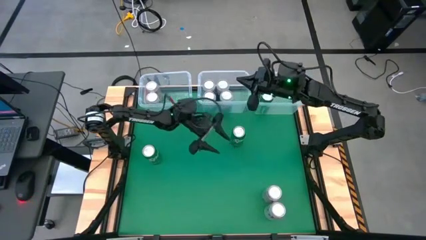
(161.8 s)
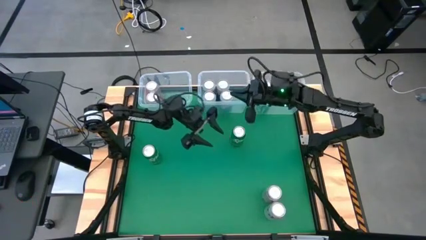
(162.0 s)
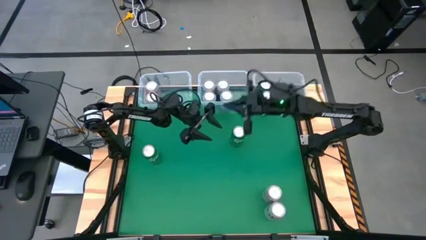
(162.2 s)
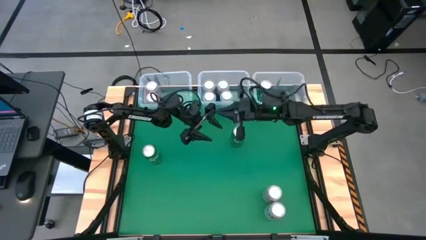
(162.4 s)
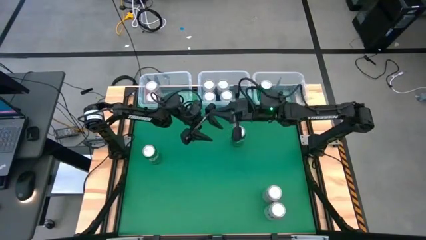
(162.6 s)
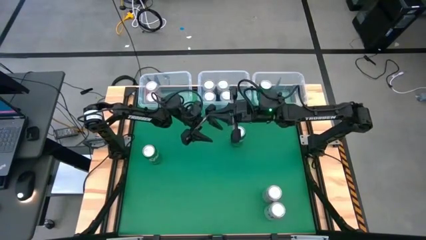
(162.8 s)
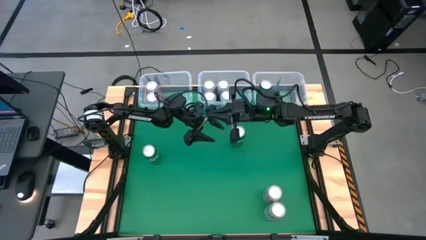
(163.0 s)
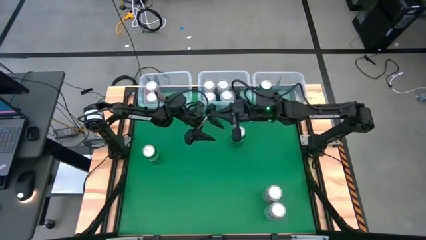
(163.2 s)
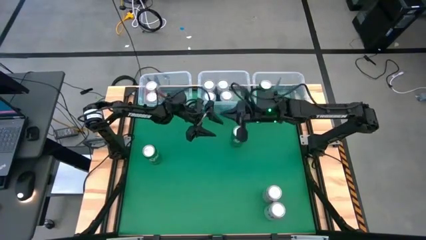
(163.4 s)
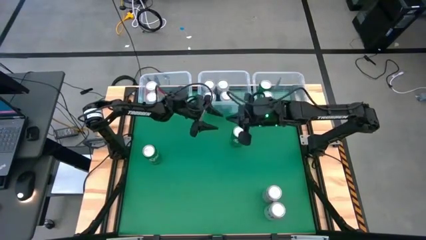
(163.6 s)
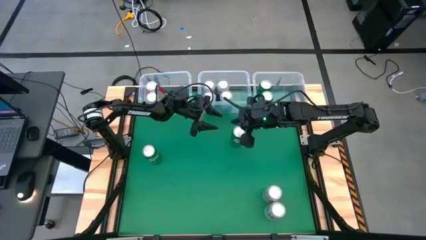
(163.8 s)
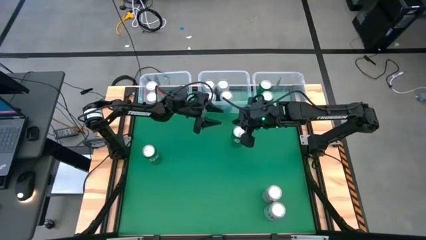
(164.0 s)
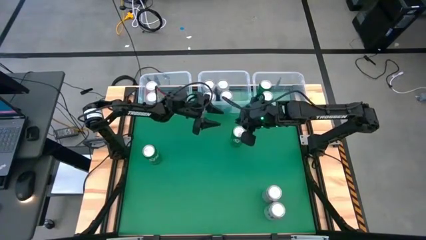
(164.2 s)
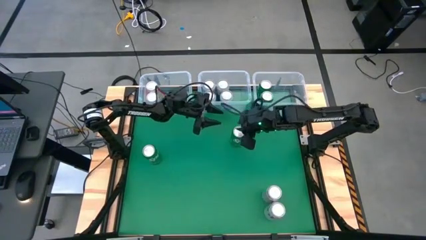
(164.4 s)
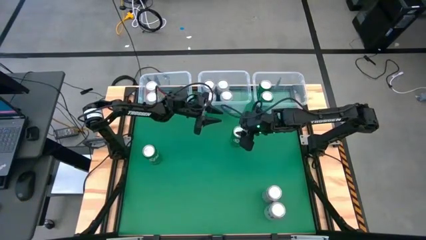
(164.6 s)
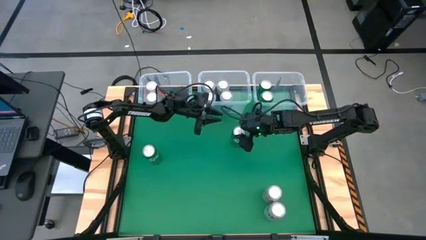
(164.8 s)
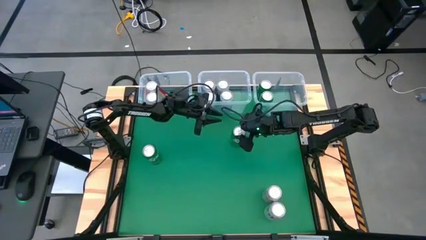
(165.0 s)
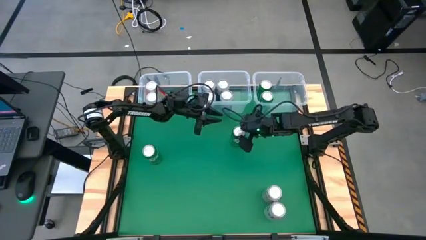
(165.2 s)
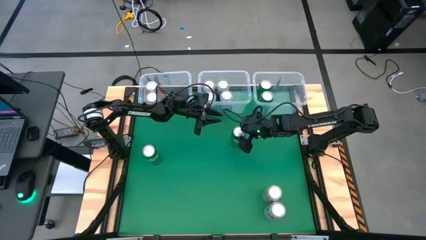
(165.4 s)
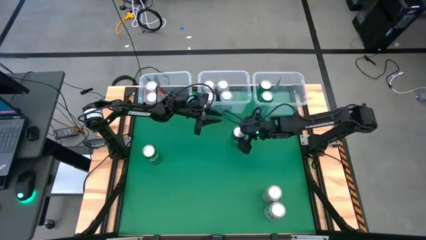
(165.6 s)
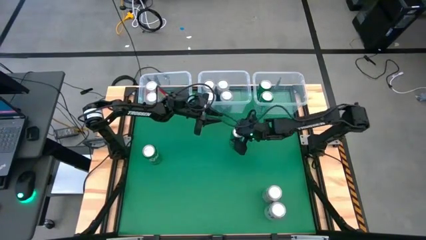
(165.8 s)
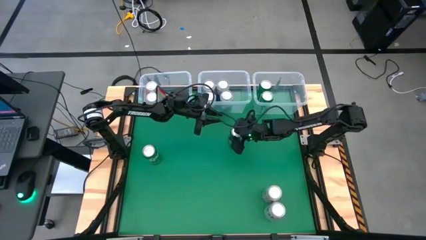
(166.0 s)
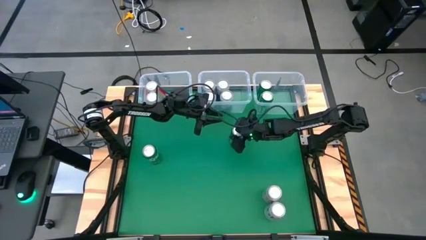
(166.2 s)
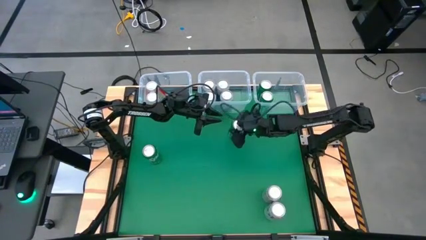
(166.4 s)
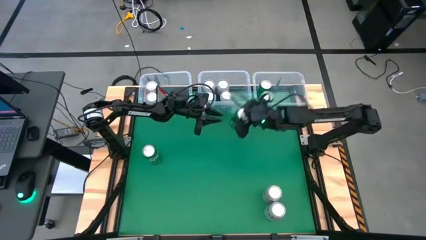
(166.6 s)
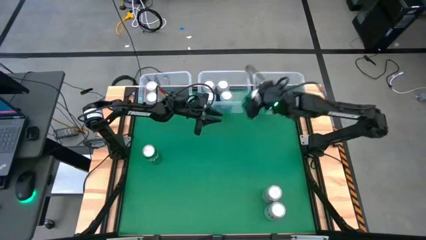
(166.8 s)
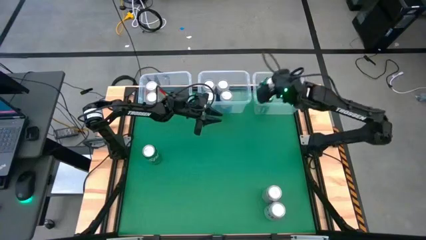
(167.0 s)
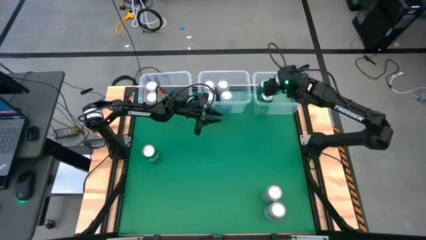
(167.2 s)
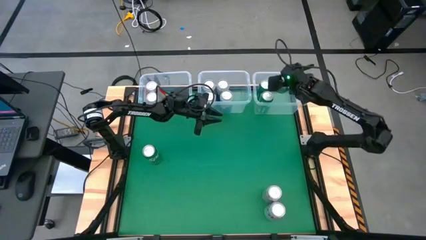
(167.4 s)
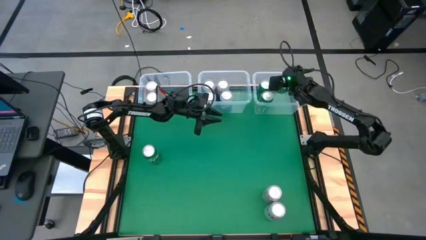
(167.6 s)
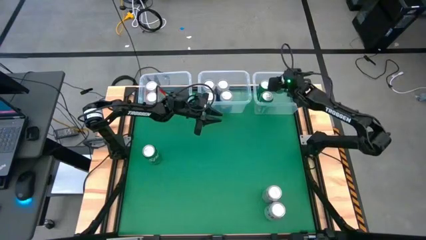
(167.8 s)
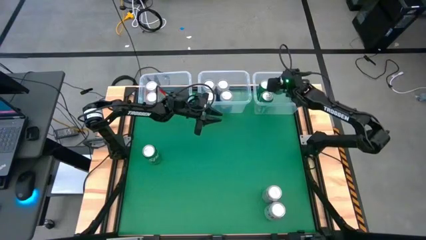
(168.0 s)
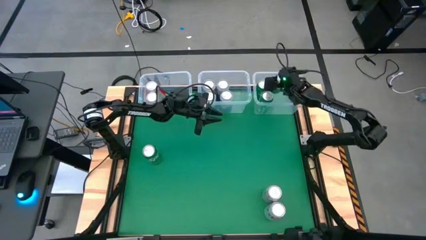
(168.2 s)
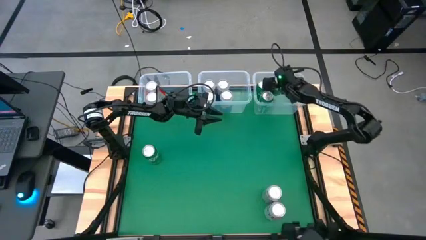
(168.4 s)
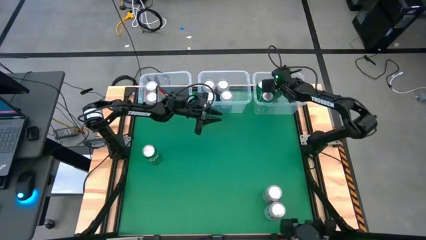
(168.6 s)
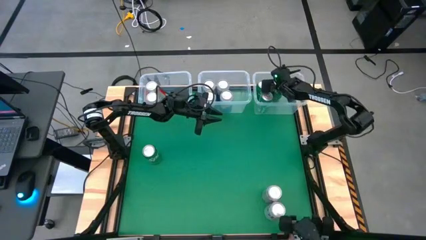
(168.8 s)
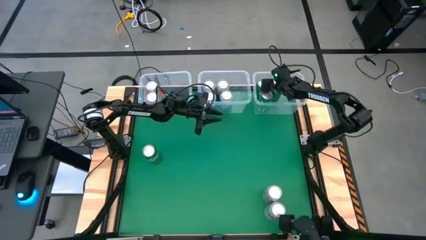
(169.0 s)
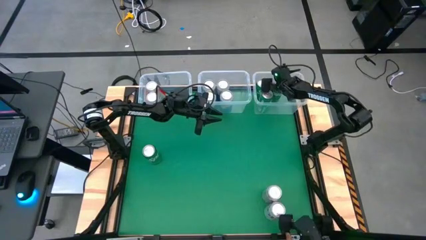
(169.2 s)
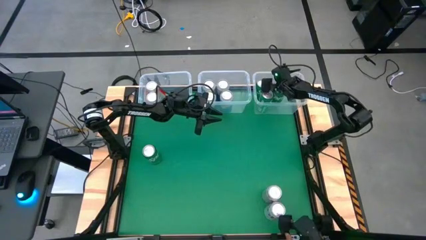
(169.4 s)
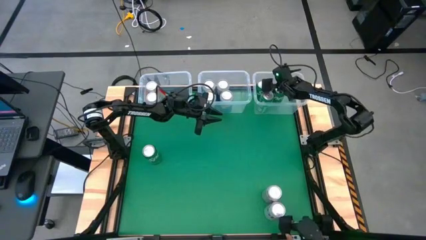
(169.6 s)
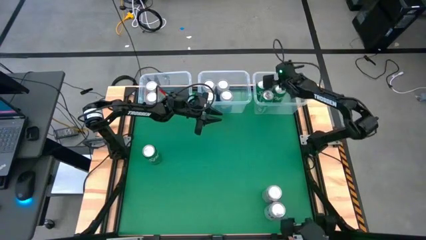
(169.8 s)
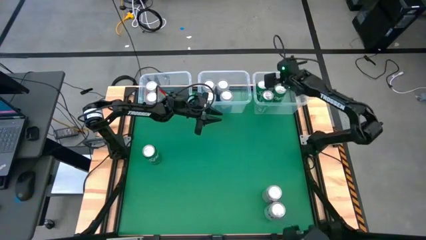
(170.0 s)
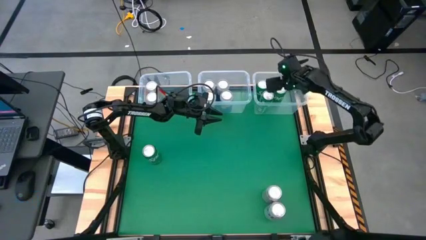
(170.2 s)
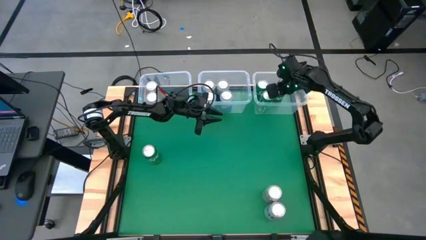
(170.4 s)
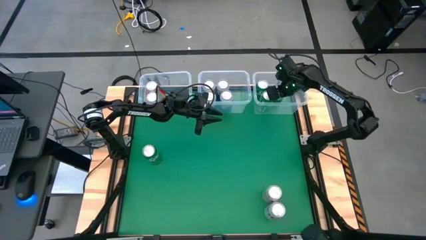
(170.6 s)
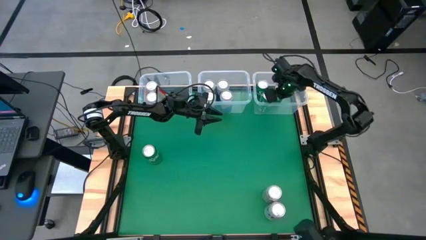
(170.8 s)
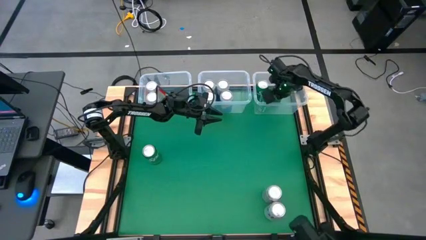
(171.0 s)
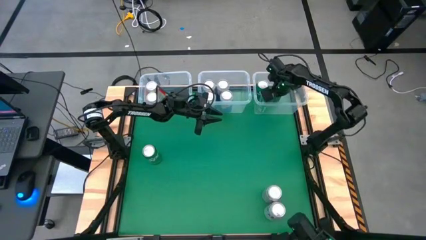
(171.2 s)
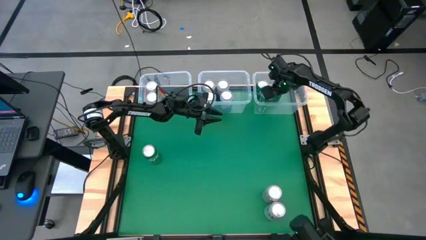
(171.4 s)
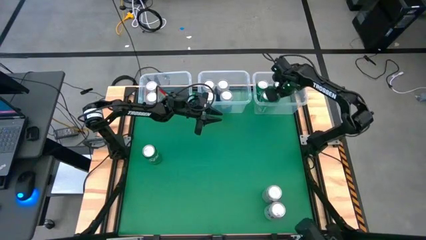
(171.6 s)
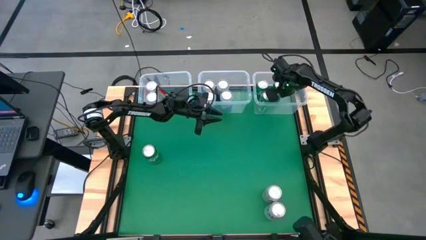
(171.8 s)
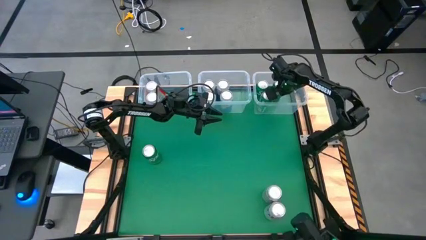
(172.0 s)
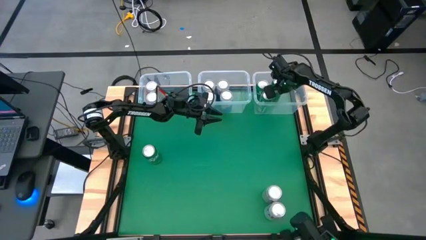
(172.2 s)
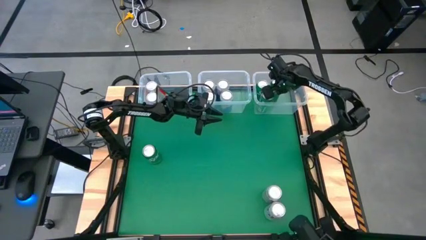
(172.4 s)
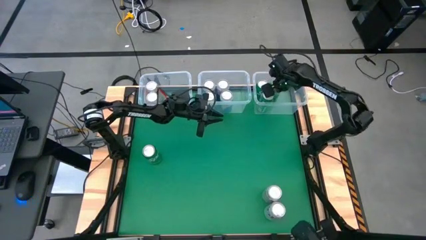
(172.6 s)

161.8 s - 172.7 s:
Task: Sort soda cans
Put the top green soda can into the right transparent bin

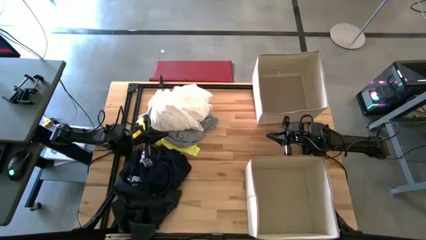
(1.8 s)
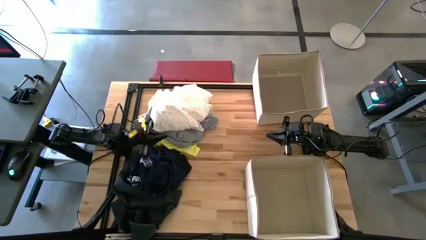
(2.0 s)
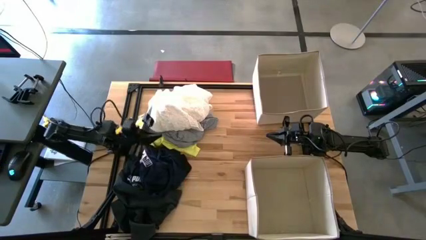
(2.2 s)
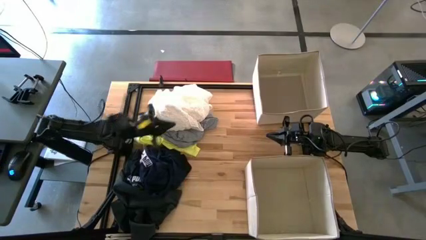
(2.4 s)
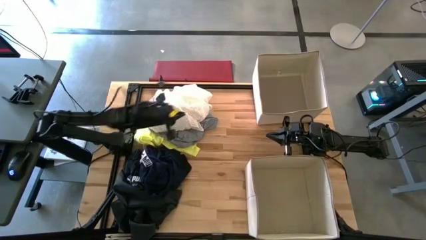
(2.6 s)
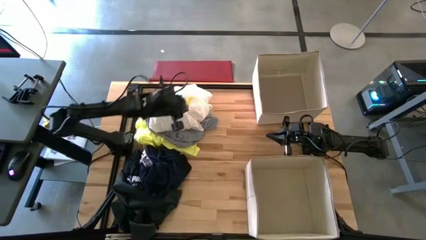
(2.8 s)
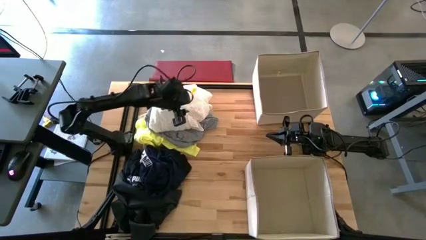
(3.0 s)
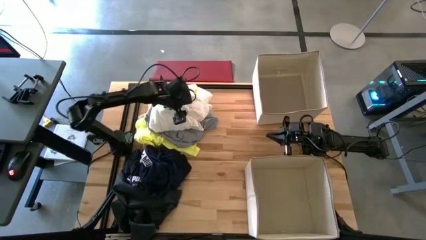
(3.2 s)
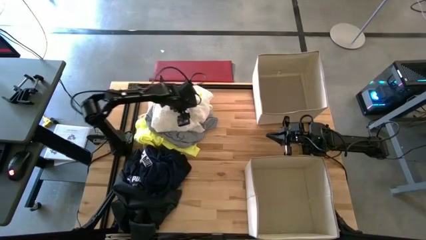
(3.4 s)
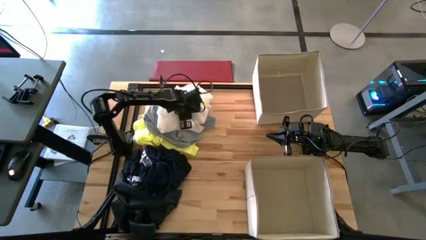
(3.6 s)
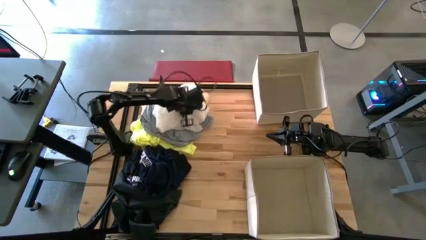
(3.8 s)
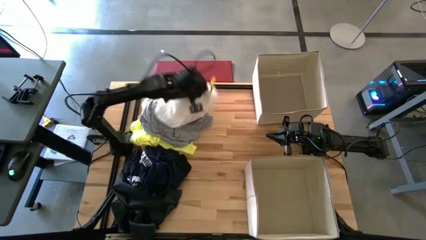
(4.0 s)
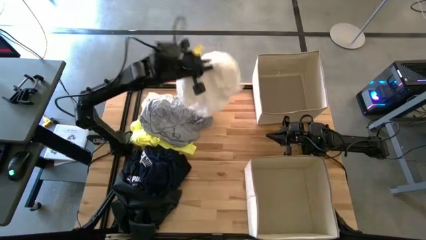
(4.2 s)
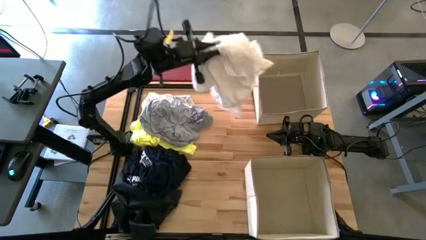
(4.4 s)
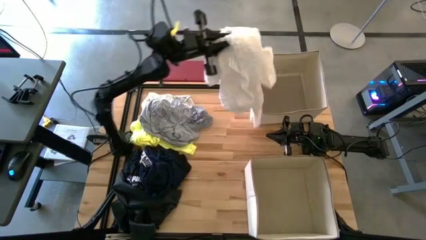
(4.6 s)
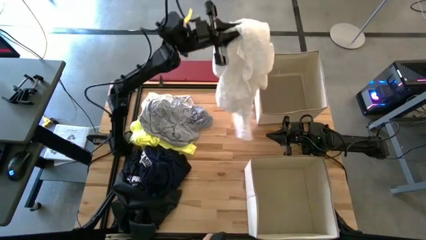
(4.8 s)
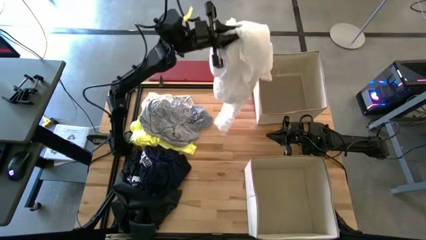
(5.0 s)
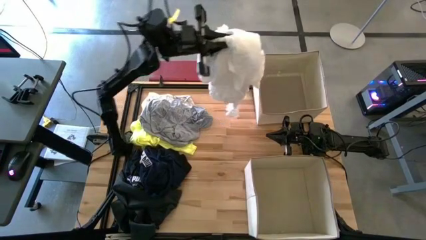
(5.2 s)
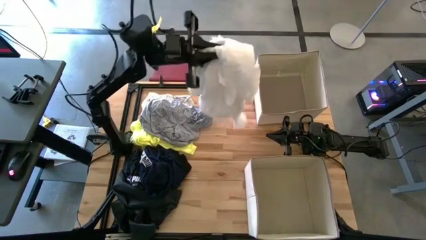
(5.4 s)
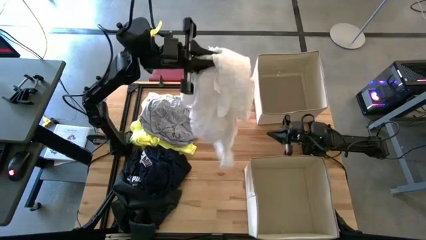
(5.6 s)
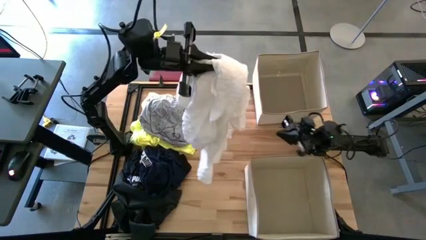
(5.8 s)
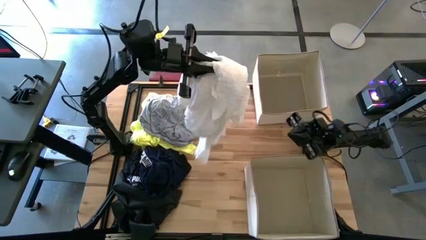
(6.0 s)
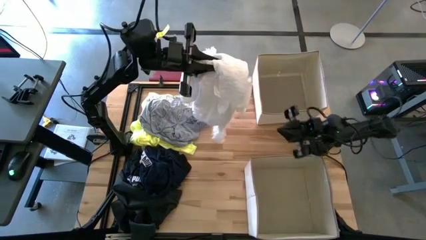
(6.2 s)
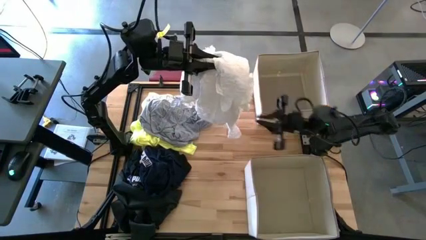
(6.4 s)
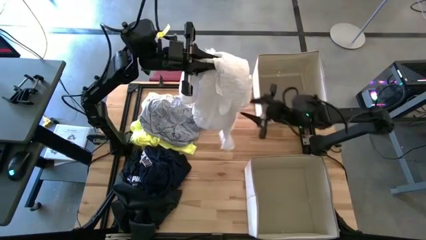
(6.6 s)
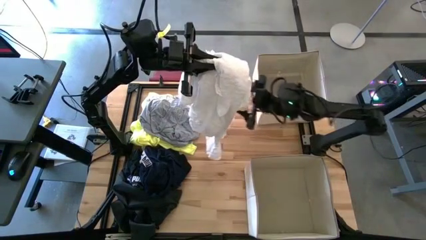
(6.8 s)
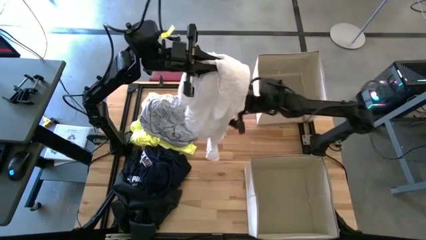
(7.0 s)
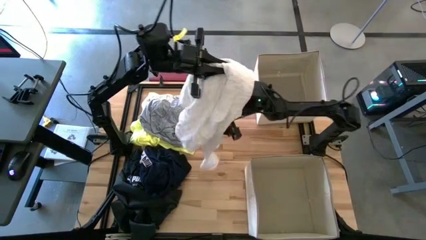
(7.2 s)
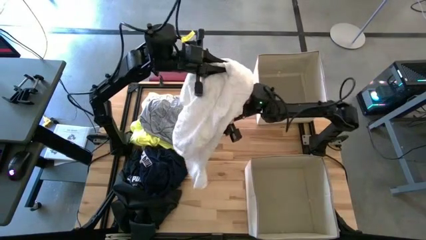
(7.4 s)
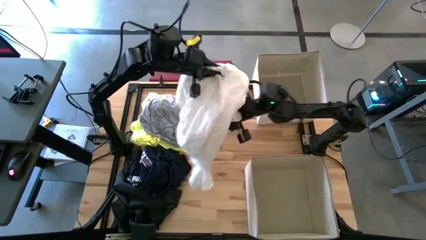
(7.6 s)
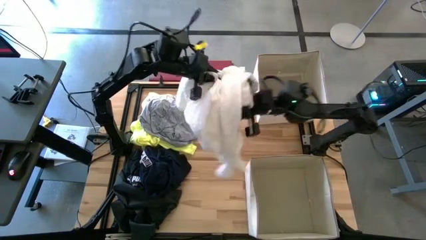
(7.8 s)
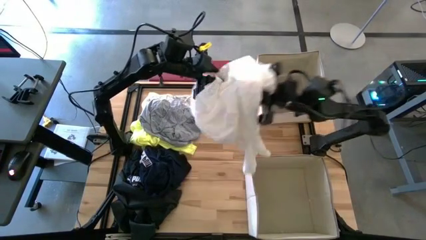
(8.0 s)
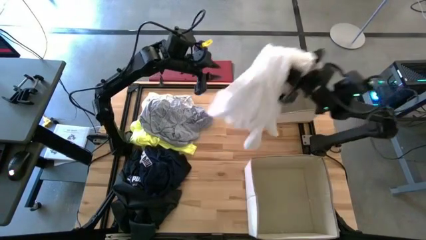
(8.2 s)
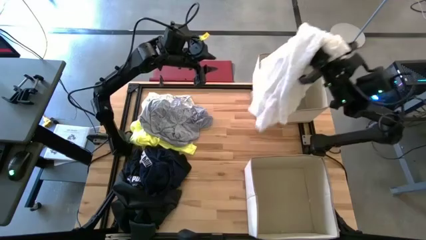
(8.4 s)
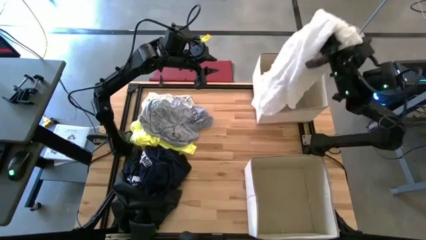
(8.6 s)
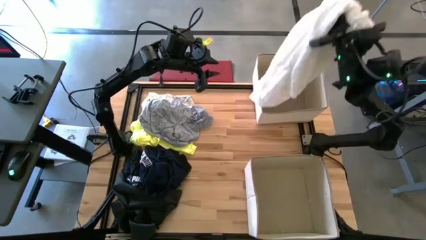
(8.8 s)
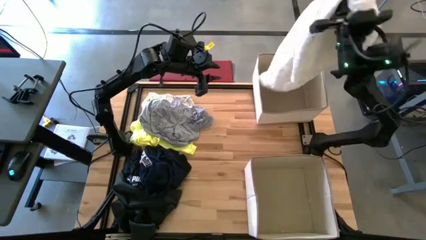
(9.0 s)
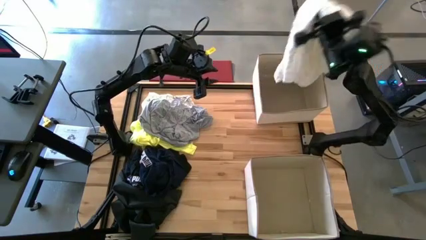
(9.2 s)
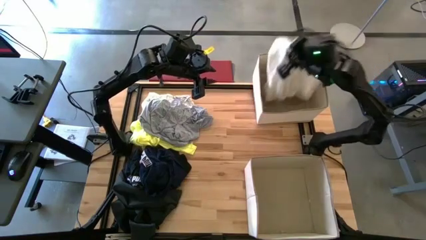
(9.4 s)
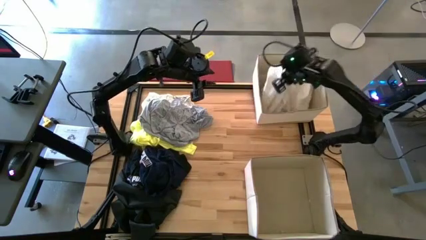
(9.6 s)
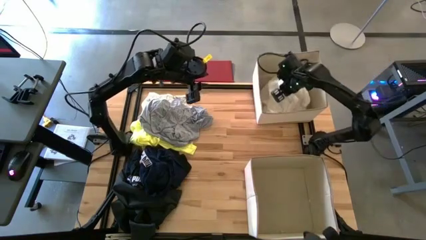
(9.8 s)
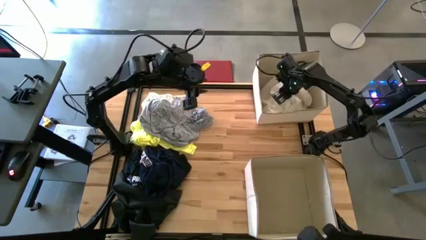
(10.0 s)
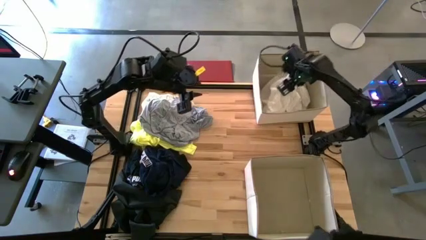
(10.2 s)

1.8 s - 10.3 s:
Task: Sort clothes
Put the white dress in the top white bin
